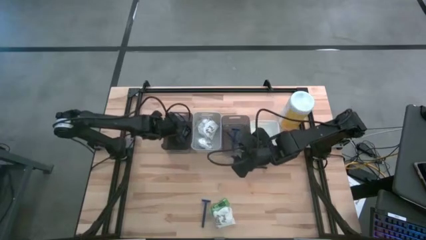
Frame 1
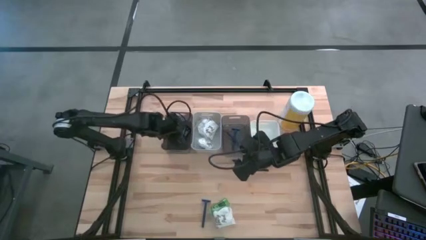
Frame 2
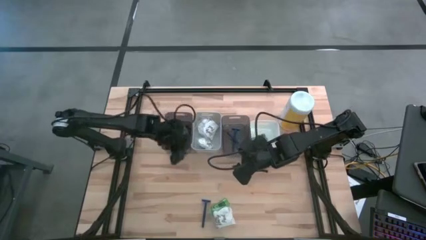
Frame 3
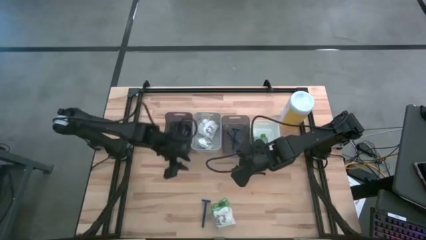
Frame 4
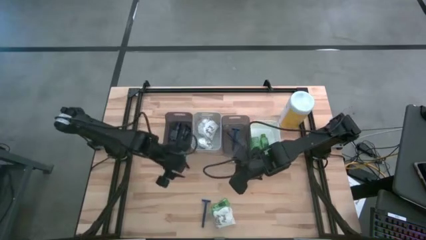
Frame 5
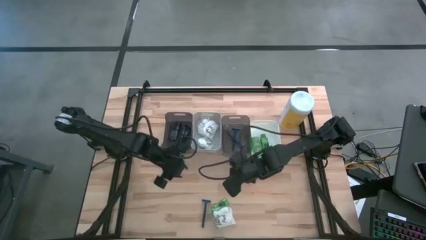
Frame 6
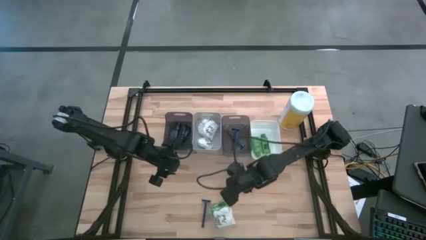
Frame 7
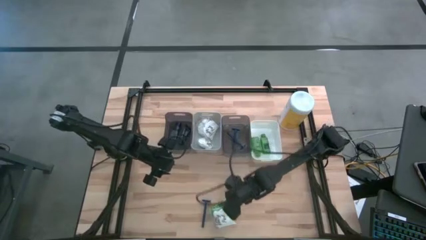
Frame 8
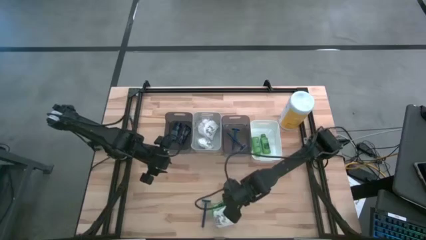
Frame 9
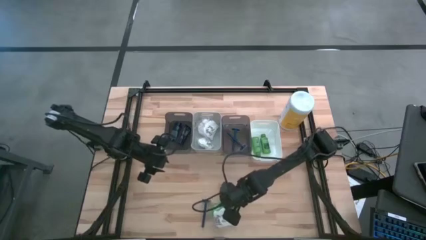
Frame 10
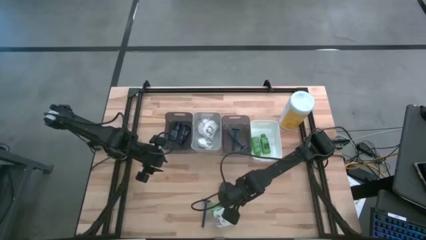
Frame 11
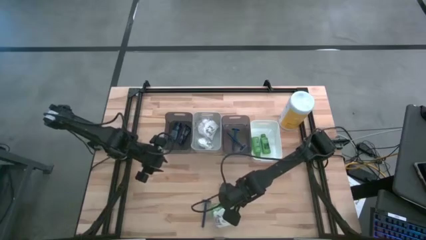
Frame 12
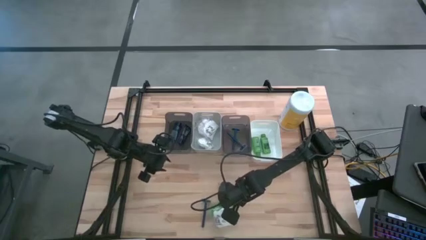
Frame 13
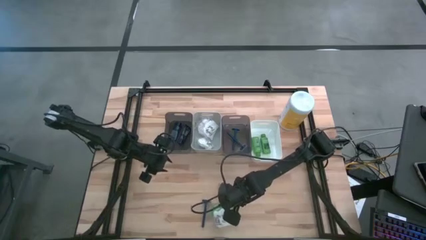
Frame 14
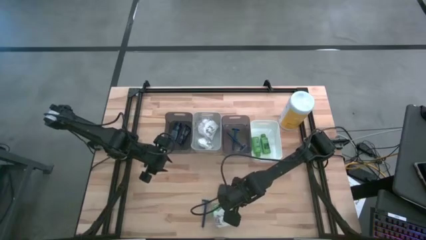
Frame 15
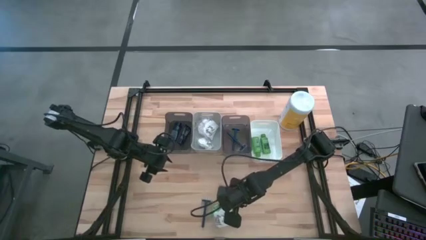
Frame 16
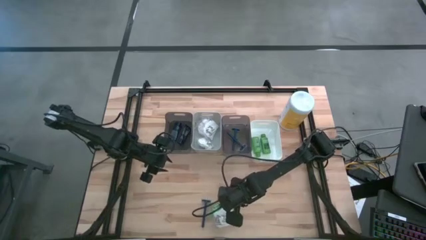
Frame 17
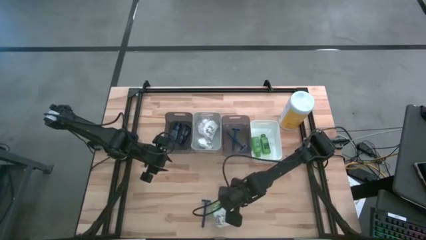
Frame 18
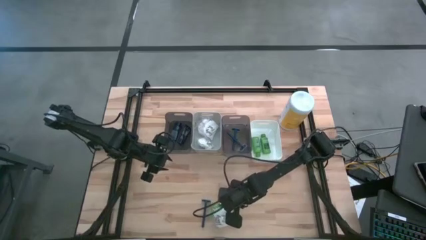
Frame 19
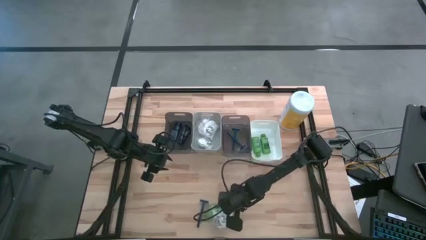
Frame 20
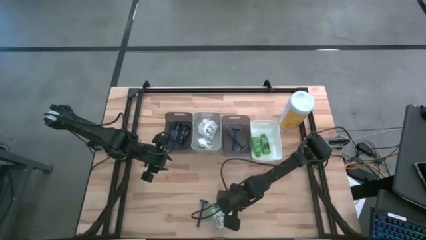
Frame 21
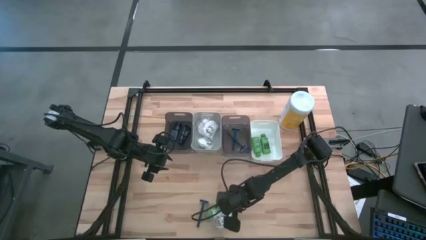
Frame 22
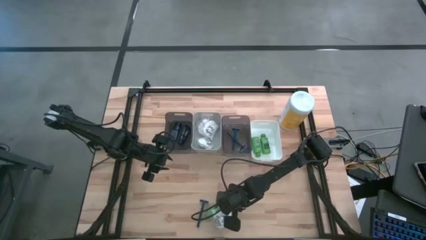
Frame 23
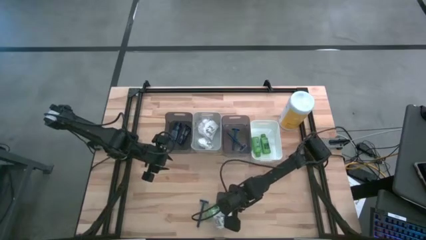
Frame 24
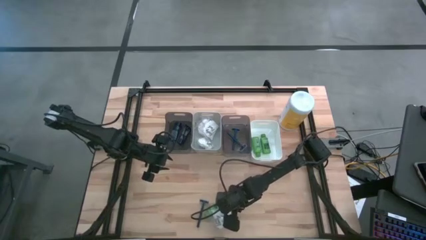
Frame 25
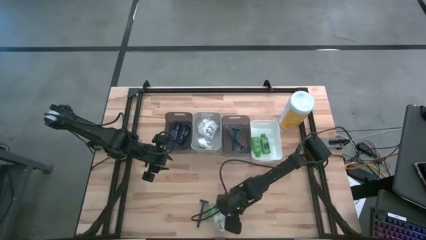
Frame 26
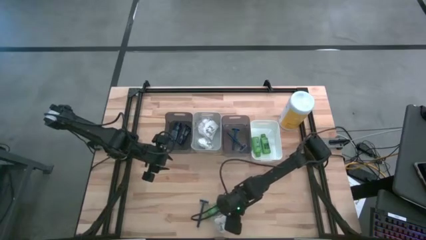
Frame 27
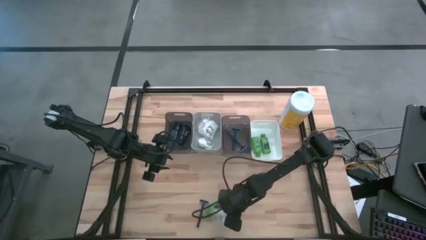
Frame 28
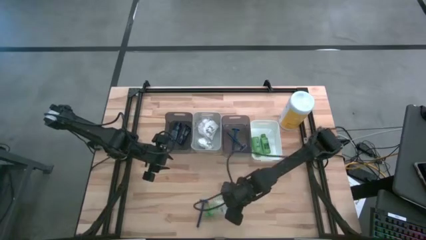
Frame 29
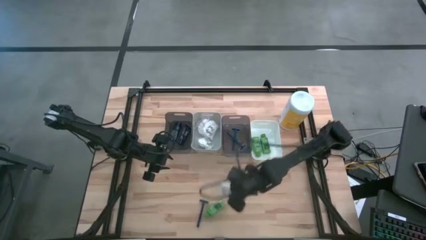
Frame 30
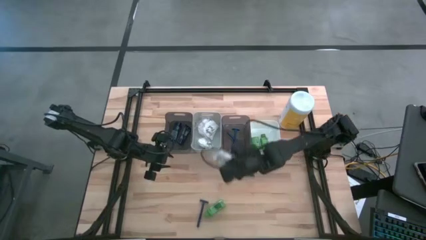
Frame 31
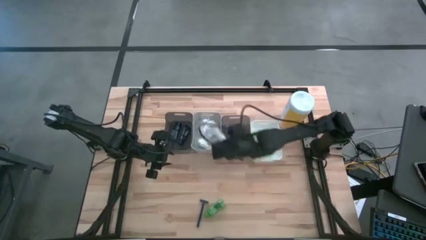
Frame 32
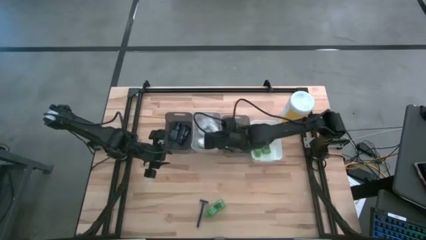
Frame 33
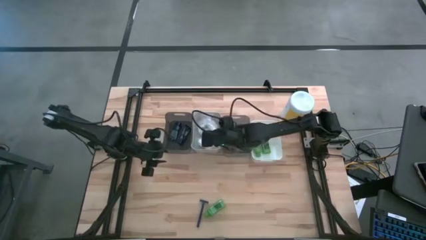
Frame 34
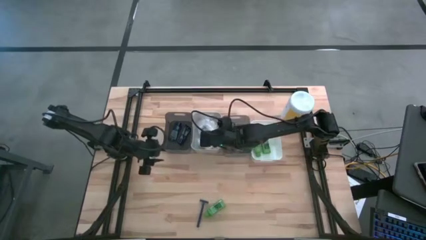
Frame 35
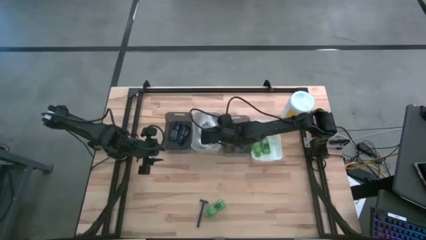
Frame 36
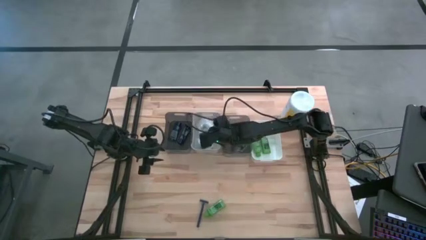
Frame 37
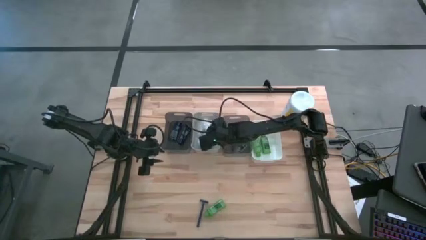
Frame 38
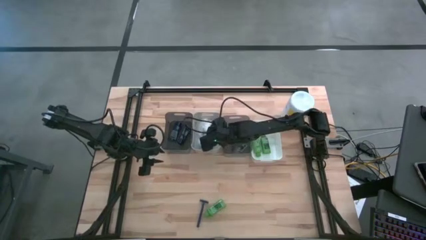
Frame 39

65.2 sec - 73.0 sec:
Task: Pick & Place Travel size toiletries
Put the white cotton pack into the gray bin

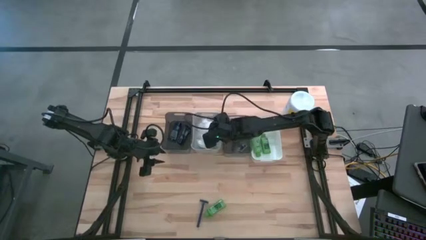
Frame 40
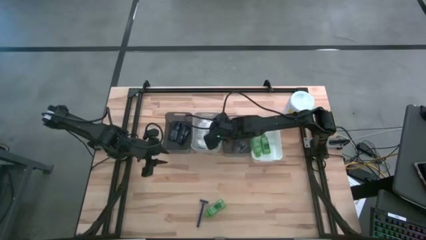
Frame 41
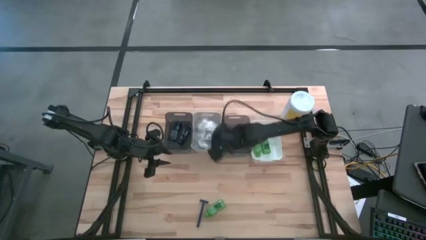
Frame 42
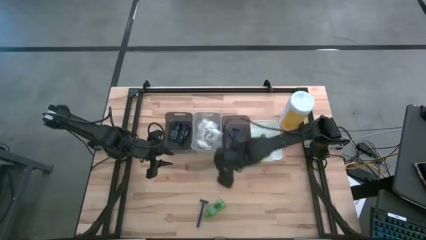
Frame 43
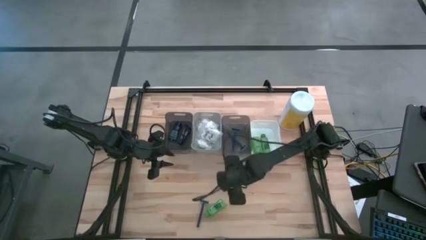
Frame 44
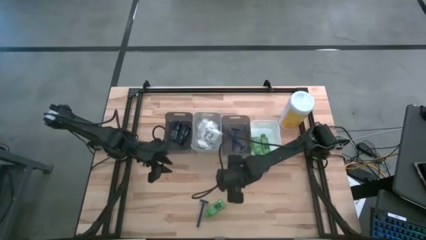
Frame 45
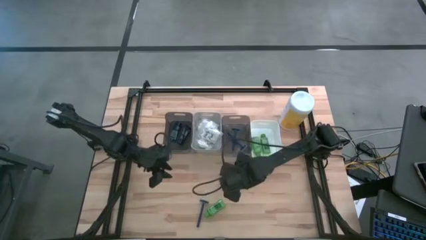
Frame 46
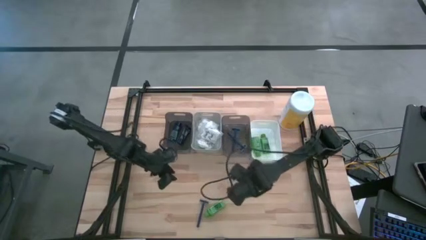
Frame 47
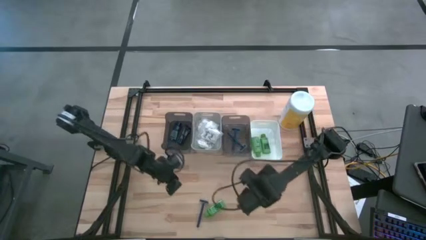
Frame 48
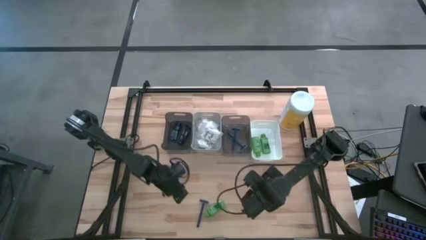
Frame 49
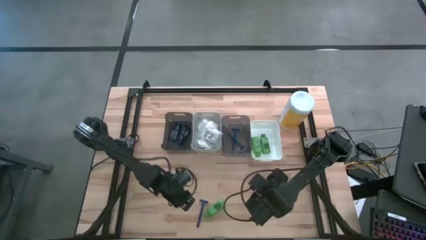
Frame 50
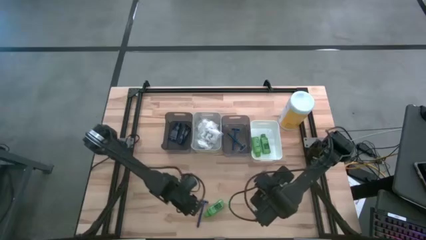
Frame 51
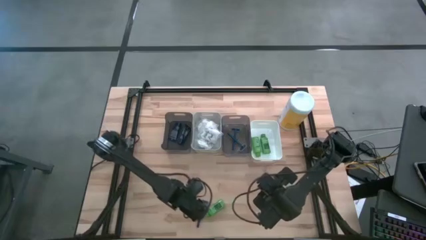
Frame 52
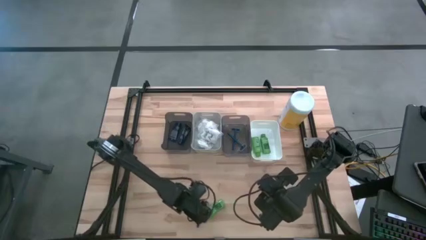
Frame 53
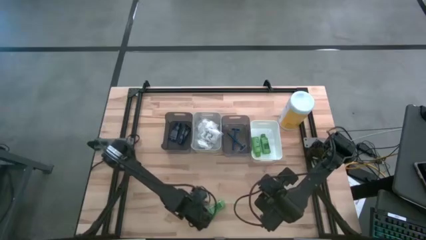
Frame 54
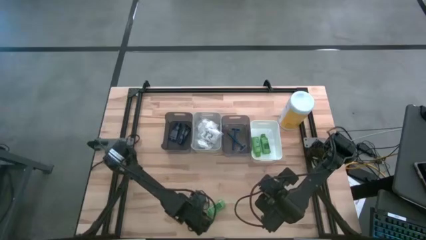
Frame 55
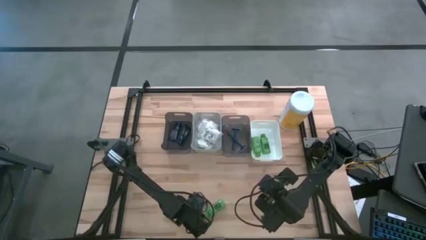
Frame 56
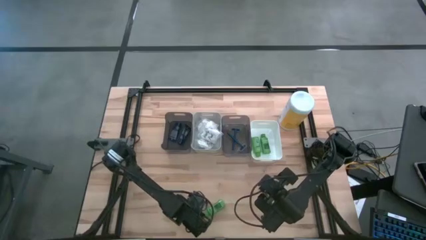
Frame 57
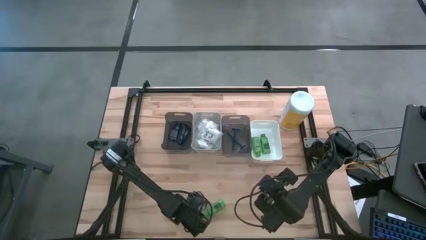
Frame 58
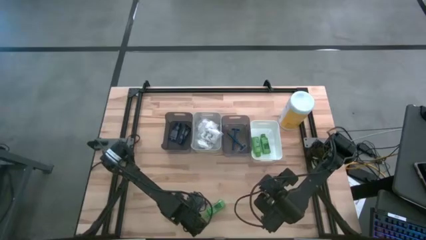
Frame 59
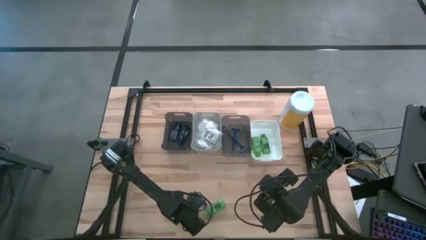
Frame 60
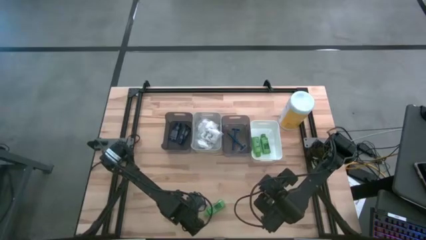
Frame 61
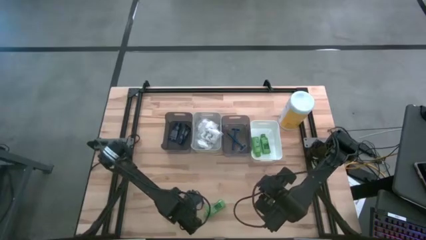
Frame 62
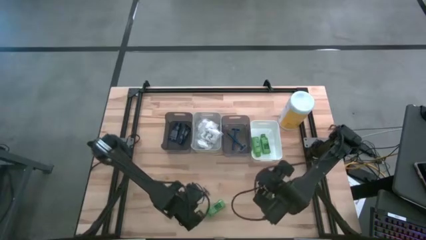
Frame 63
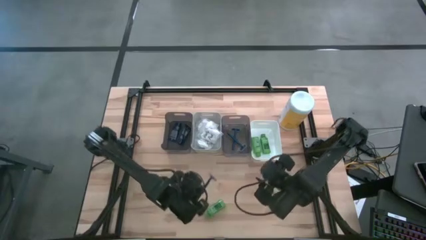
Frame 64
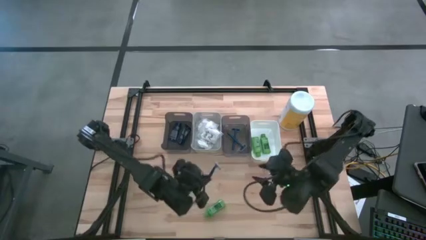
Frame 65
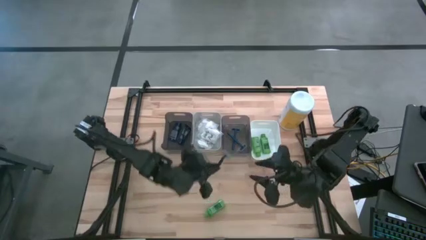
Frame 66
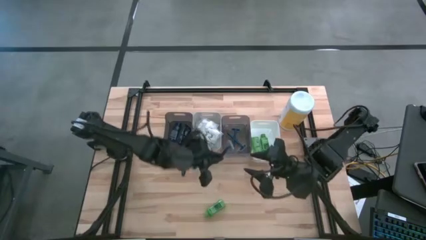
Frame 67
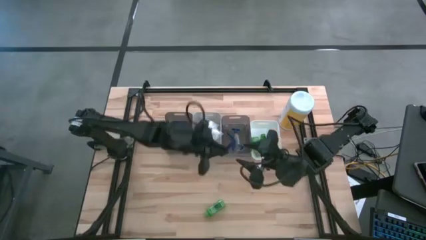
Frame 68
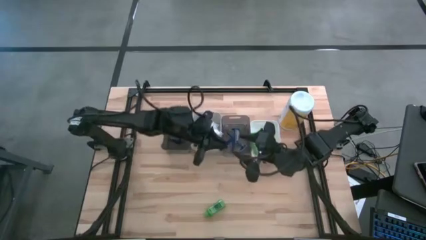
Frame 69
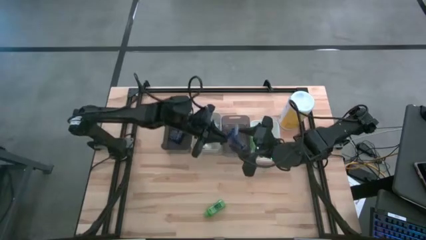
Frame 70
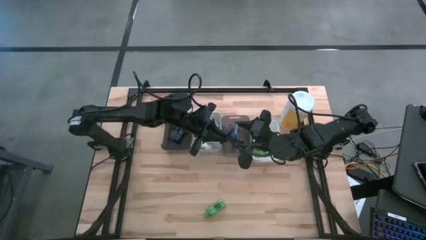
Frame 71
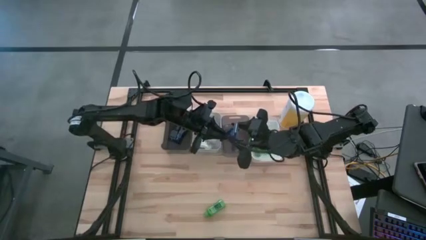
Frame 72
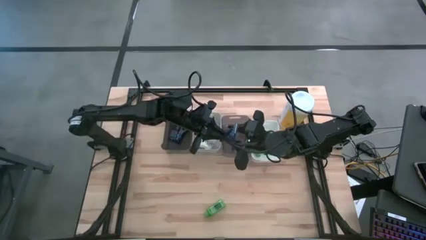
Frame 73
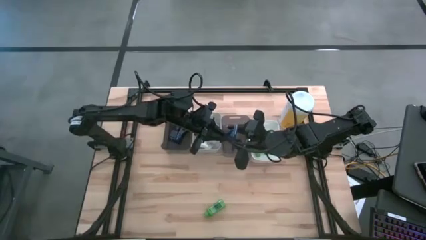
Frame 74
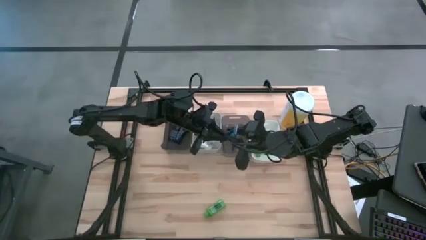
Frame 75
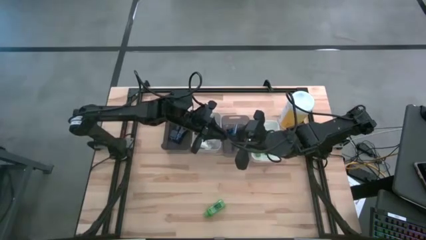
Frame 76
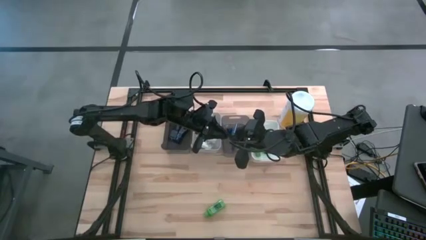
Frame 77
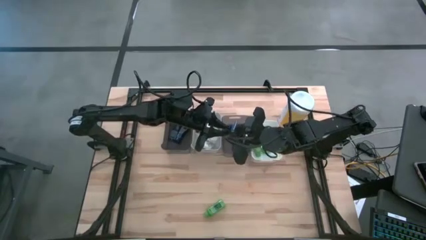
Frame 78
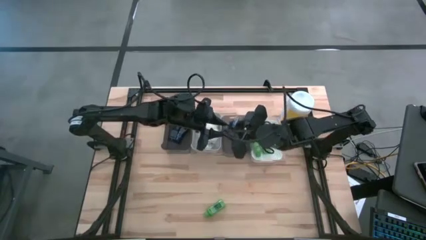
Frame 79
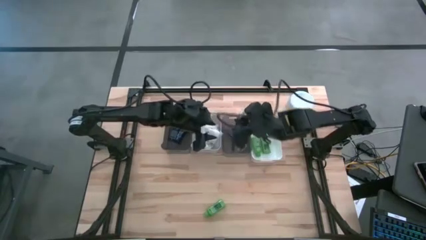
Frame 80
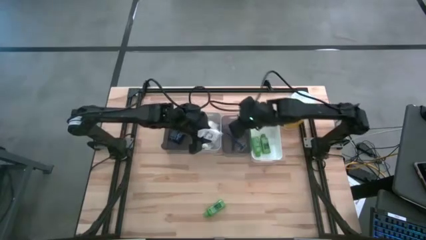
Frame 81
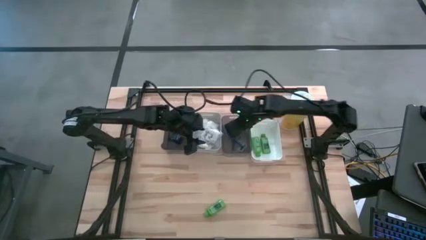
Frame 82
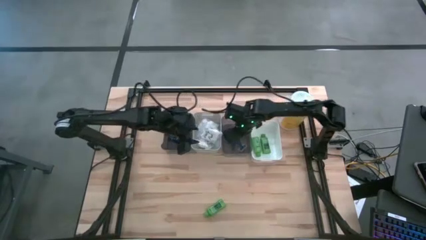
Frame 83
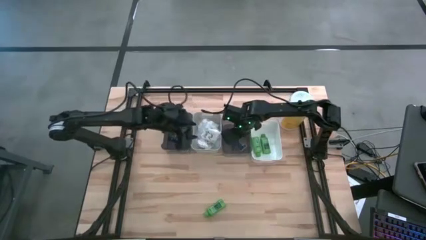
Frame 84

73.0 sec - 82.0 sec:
Put the blue razor into the right black bin
